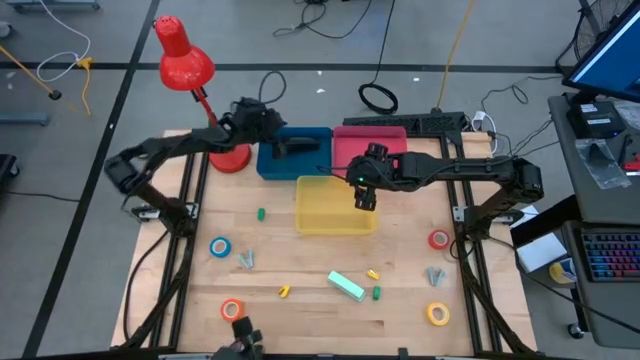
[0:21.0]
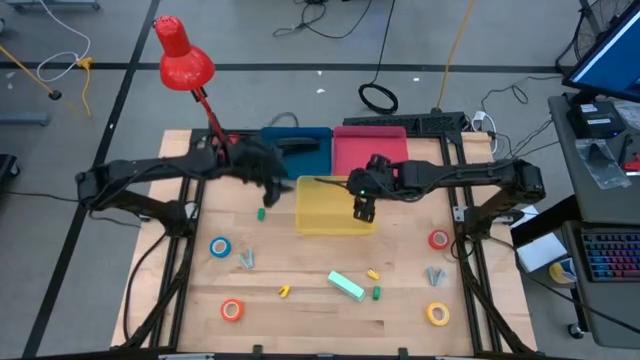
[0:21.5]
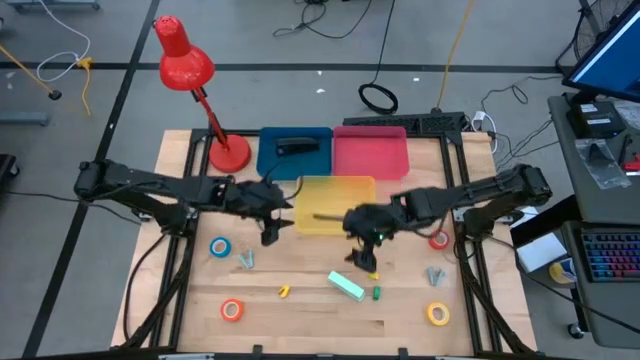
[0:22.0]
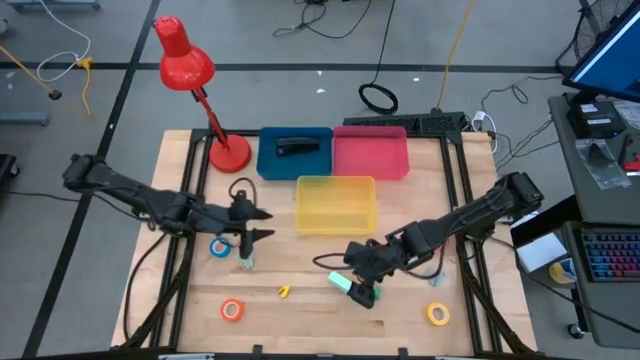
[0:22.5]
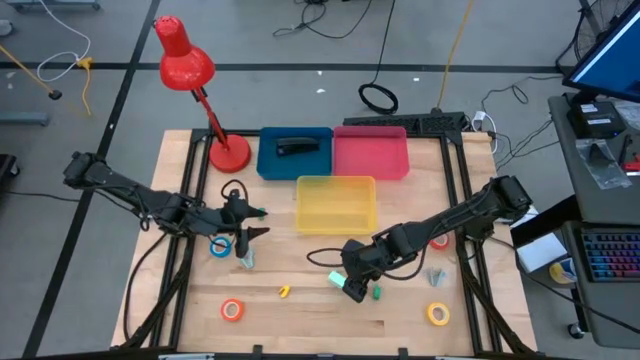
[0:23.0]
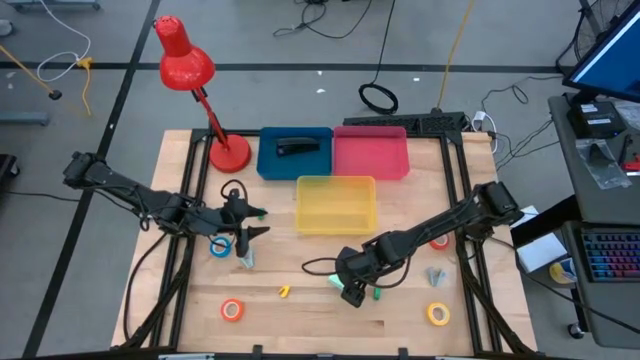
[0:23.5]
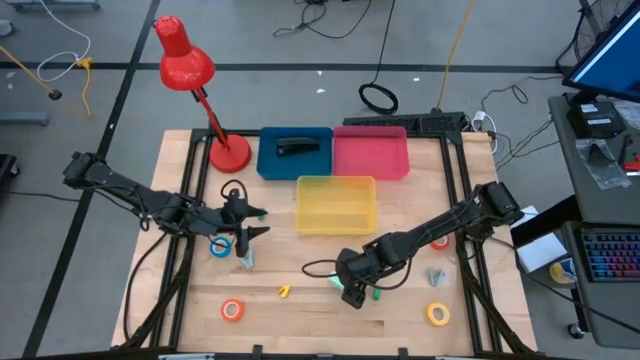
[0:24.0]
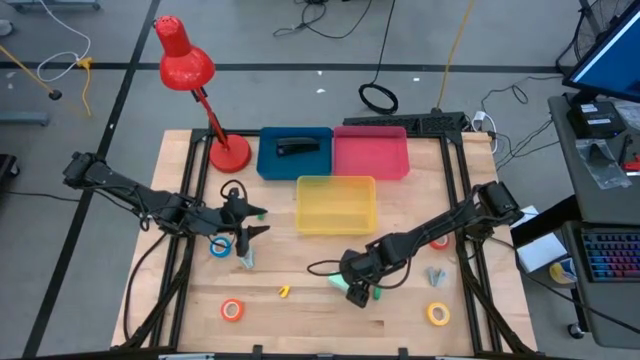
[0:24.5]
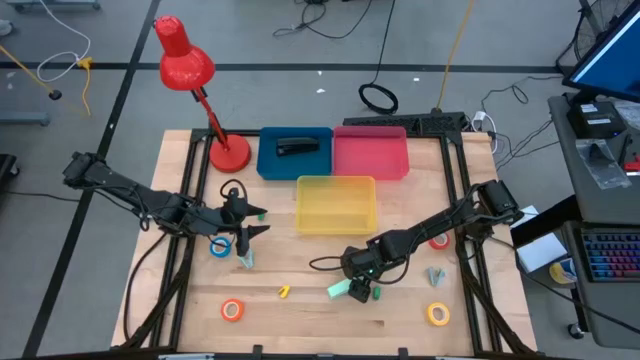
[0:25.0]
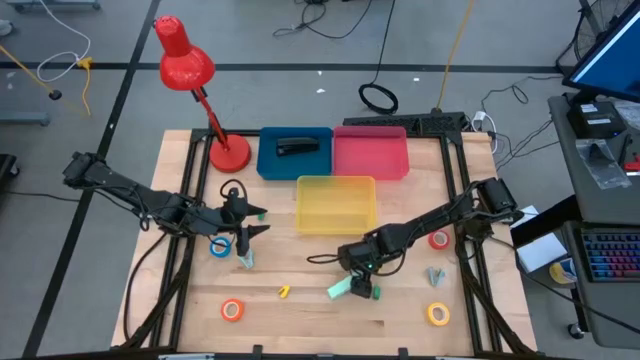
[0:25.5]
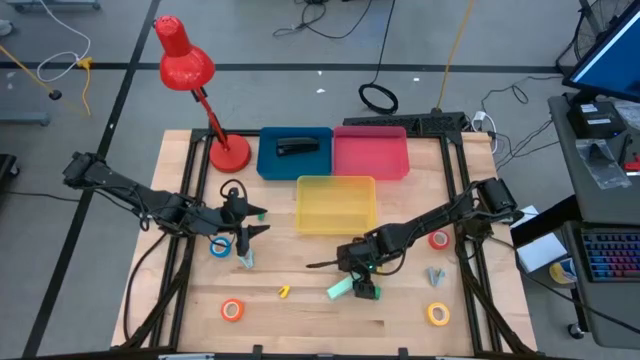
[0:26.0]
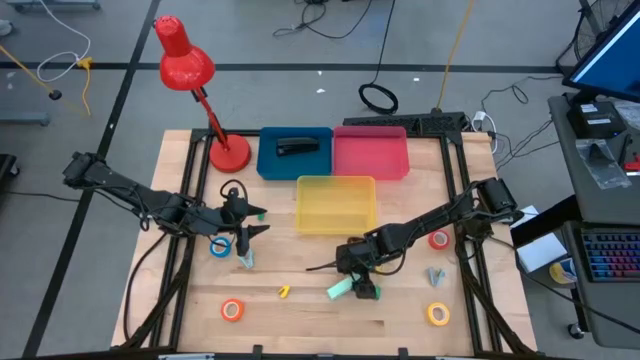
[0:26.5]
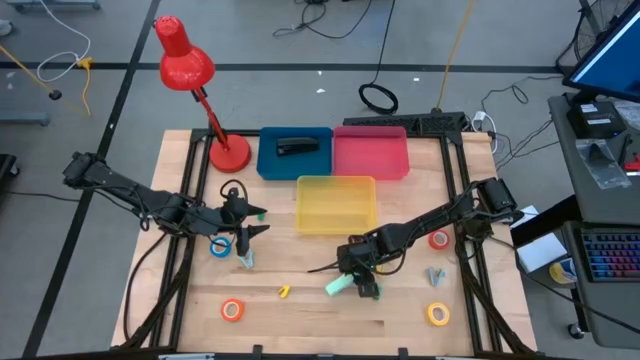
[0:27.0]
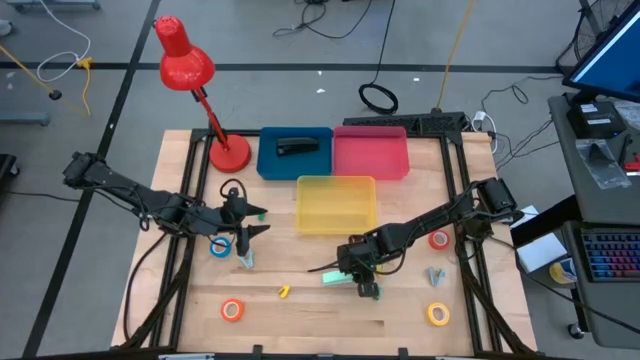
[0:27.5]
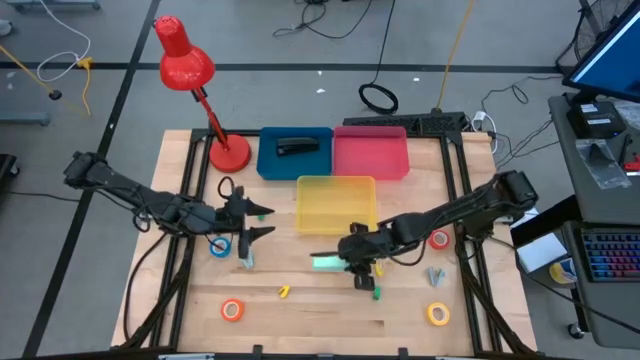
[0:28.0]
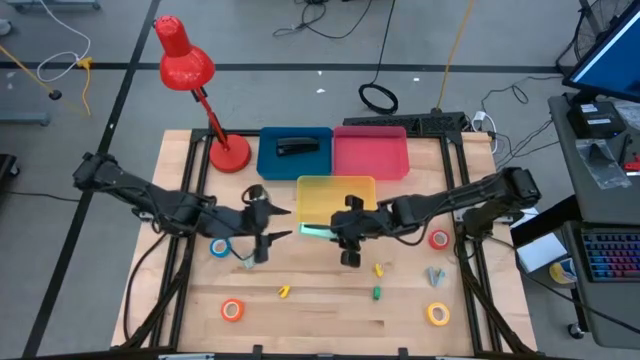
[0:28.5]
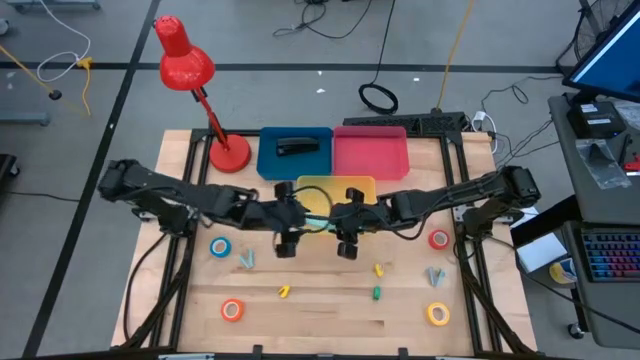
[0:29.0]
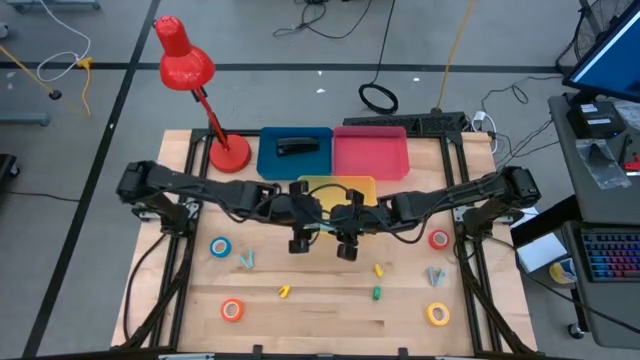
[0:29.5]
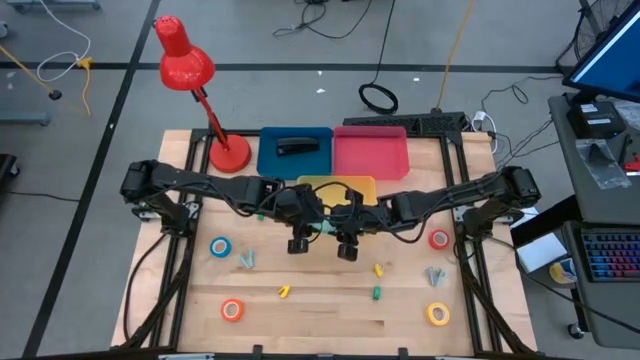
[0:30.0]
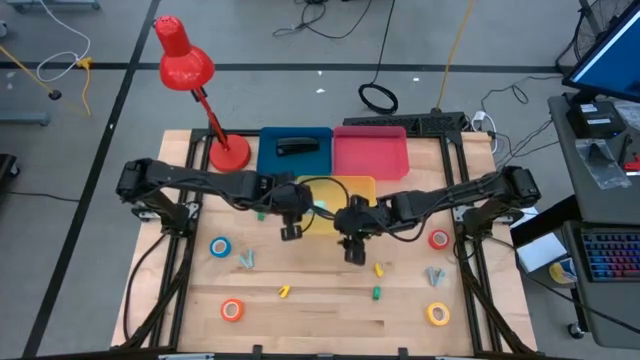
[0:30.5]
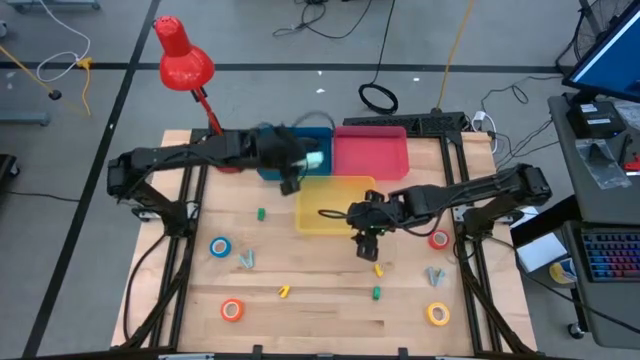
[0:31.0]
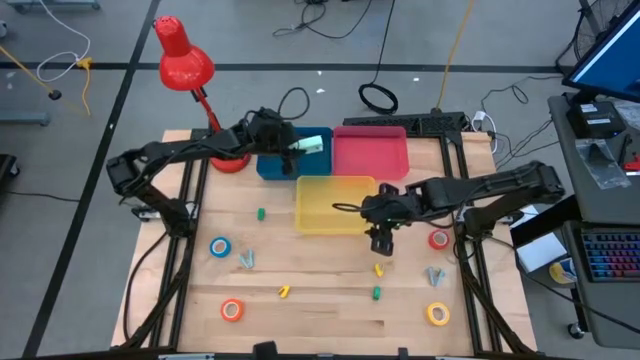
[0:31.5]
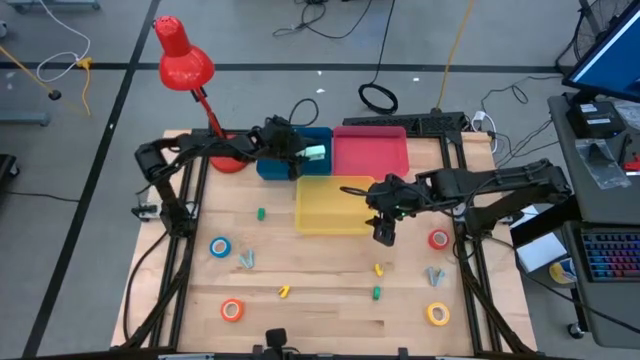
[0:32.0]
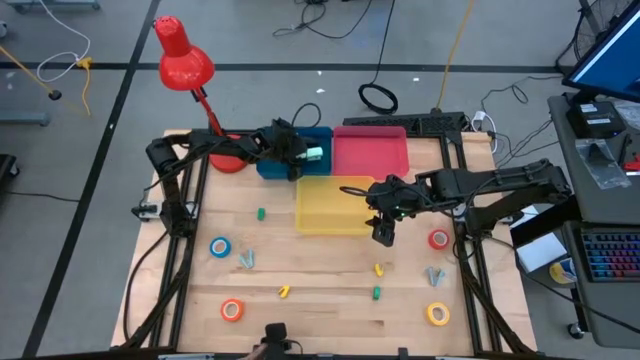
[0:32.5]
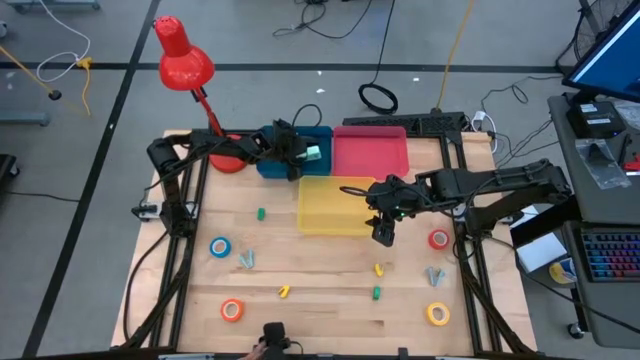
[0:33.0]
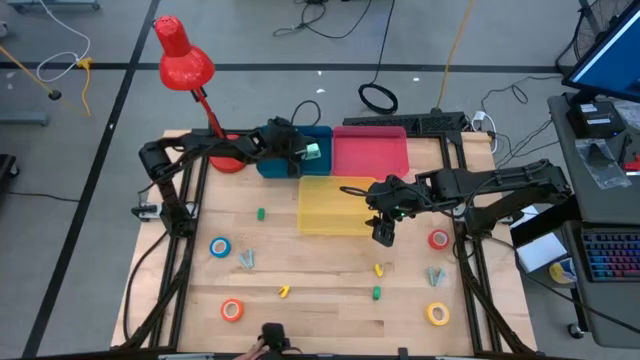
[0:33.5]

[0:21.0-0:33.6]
Task: Pick and place Stapler, Stapler remover, tape
Put the light green large stapler into the blue bin

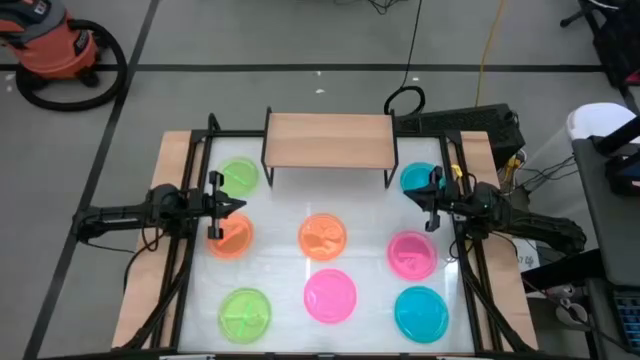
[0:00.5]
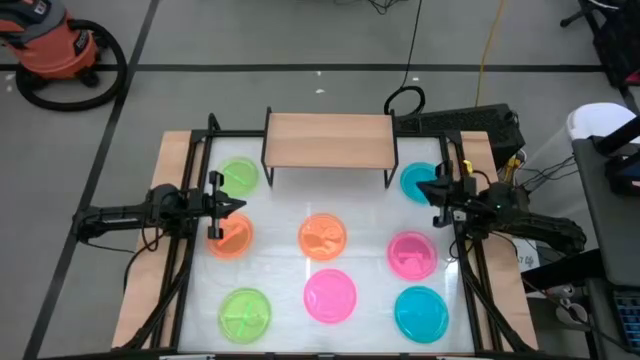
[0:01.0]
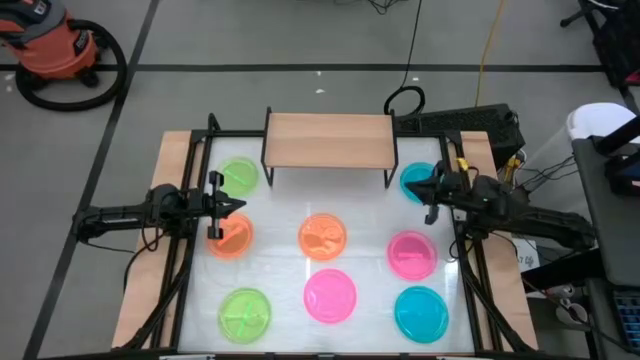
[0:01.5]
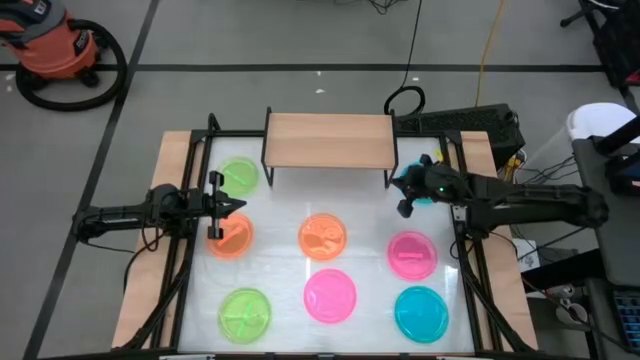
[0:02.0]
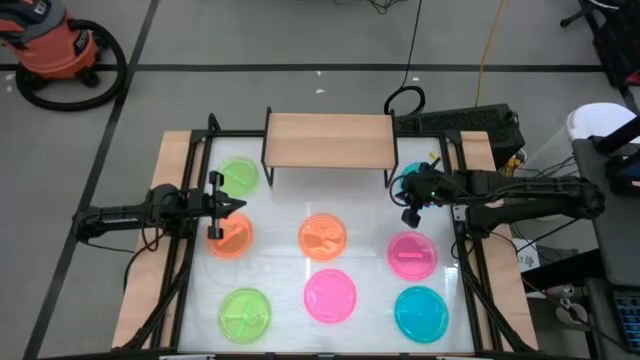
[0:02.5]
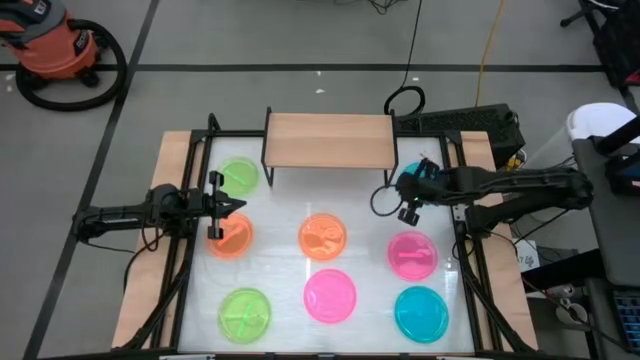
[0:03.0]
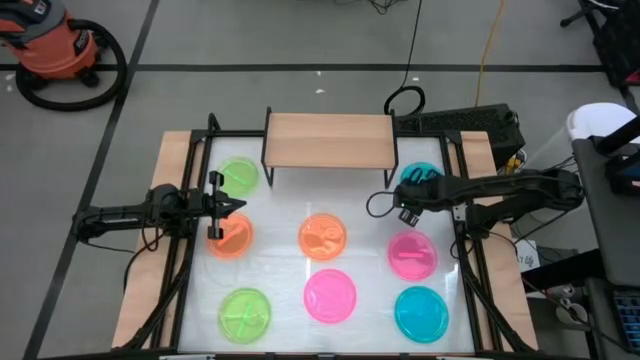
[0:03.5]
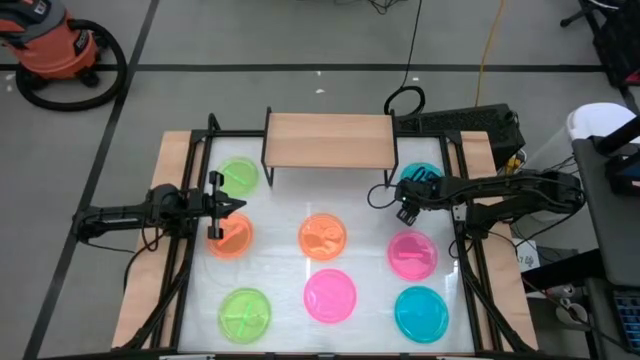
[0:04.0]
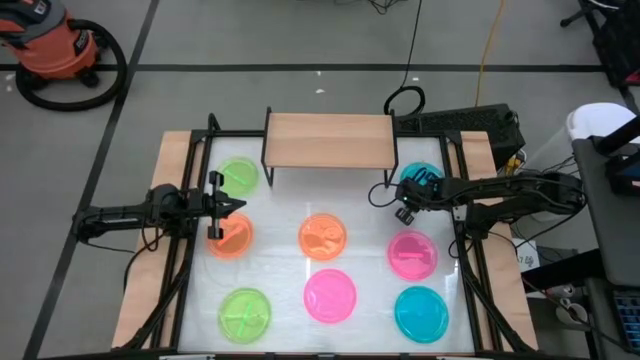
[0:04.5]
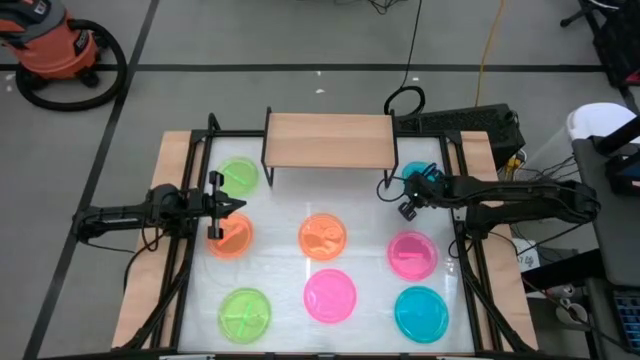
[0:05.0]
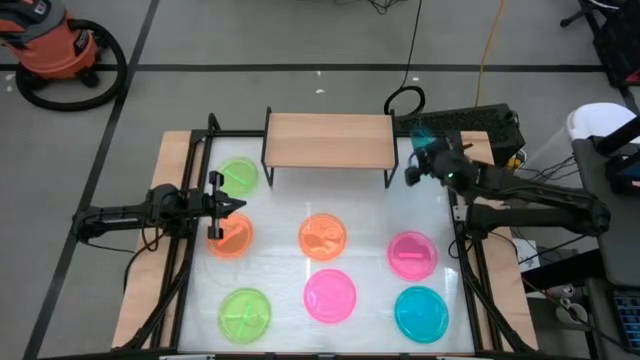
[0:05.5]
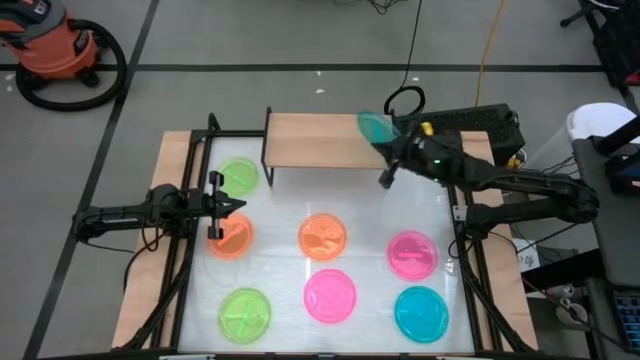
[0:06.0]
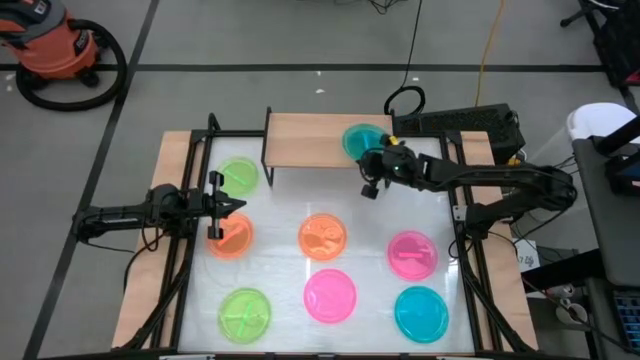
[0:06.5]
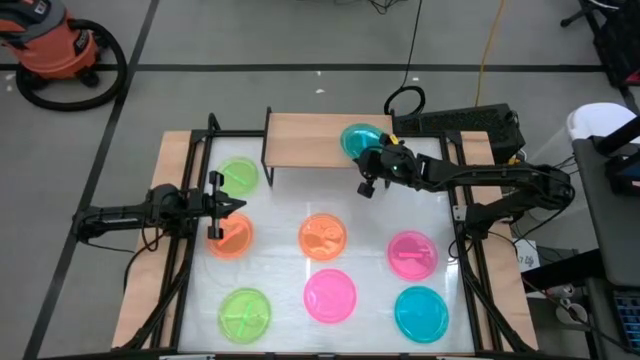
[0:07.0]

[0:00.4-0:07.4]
Task: Place and stack plates onto a shelf
Put the top blue plate on the shelf
